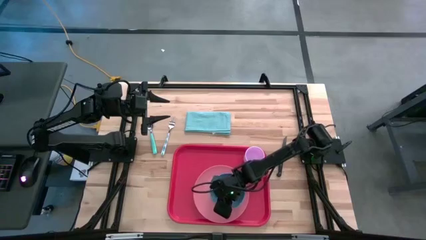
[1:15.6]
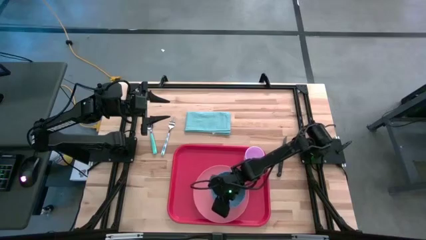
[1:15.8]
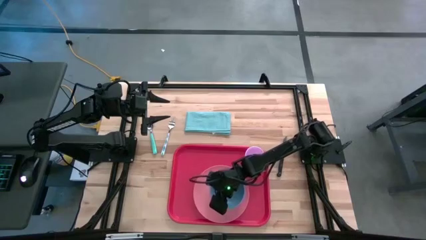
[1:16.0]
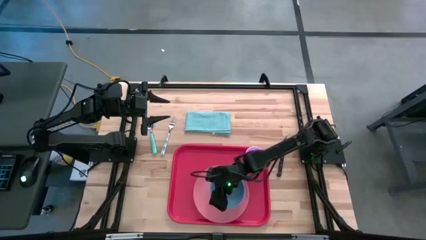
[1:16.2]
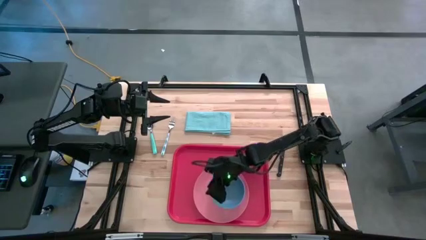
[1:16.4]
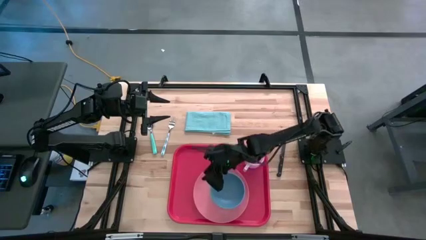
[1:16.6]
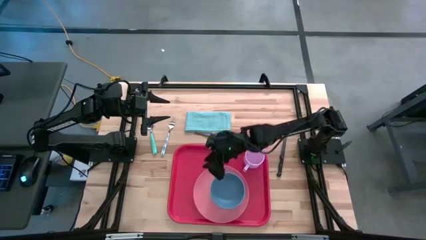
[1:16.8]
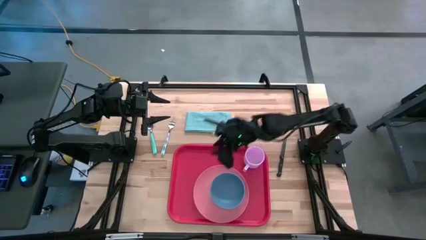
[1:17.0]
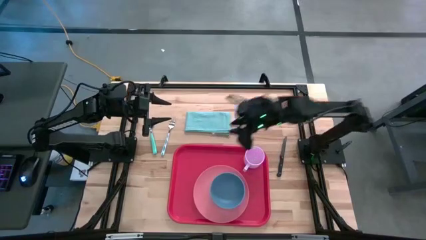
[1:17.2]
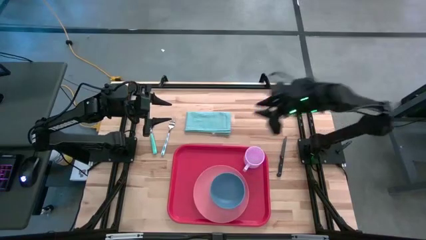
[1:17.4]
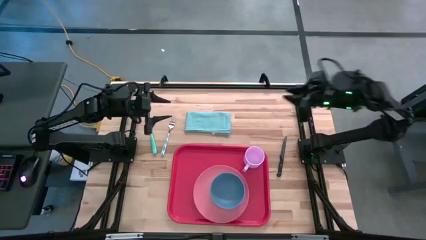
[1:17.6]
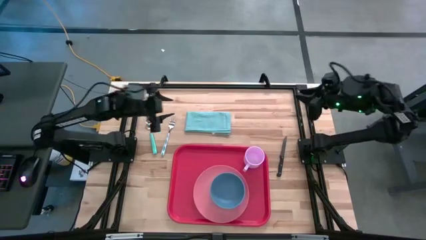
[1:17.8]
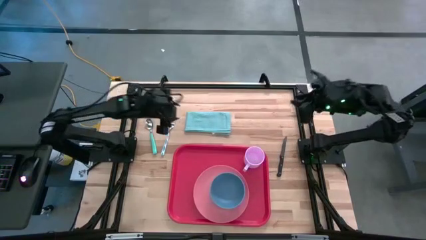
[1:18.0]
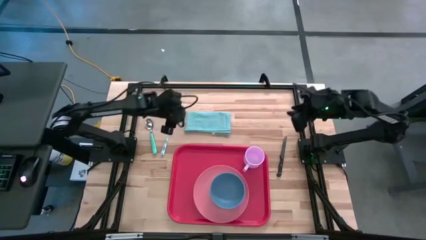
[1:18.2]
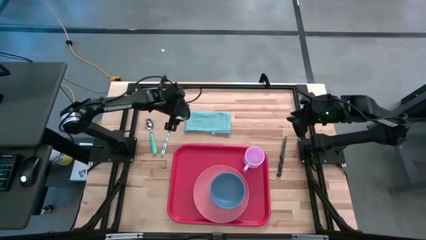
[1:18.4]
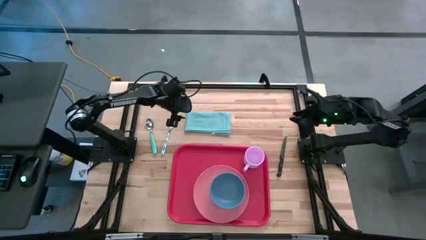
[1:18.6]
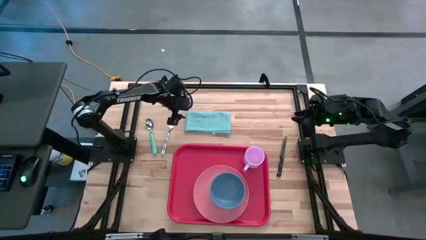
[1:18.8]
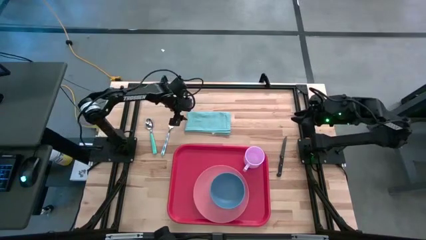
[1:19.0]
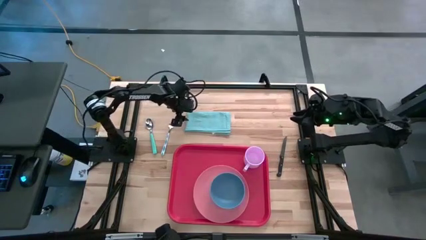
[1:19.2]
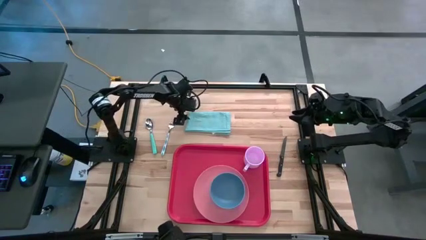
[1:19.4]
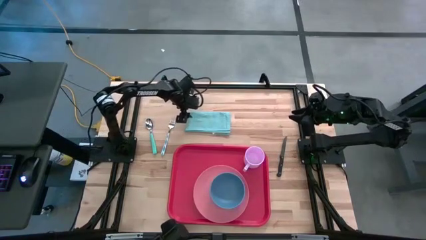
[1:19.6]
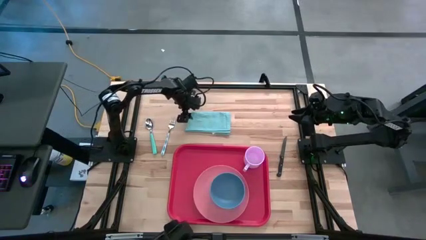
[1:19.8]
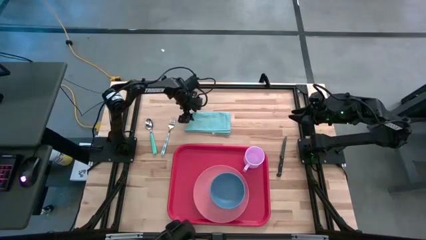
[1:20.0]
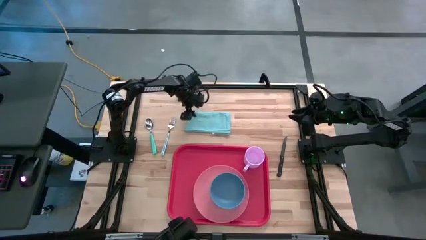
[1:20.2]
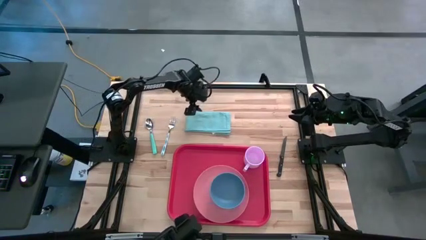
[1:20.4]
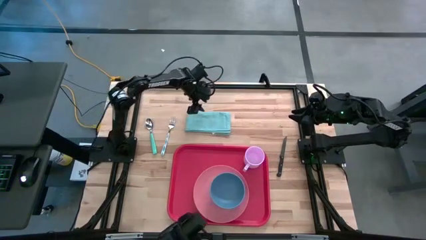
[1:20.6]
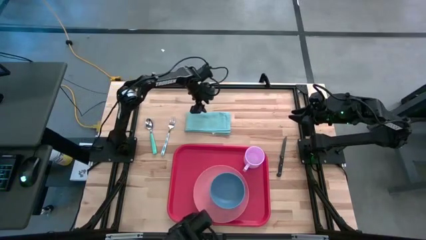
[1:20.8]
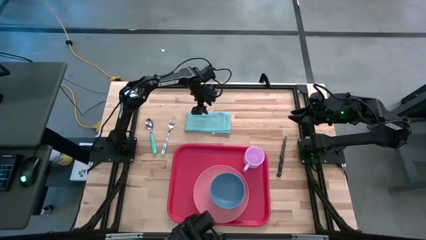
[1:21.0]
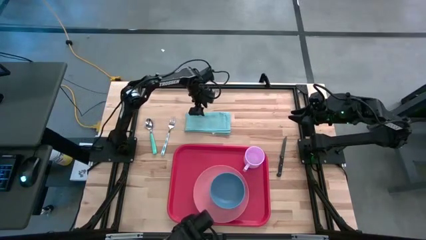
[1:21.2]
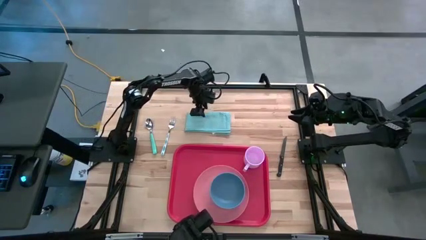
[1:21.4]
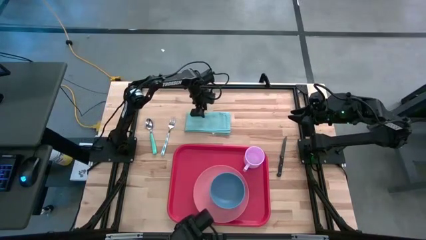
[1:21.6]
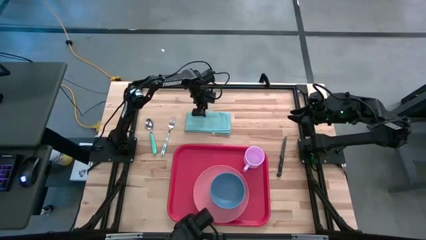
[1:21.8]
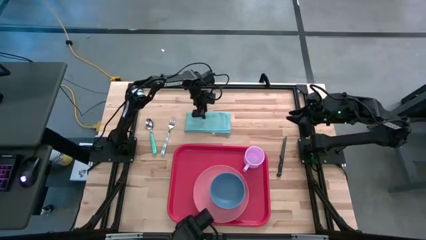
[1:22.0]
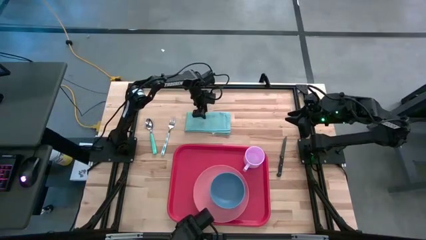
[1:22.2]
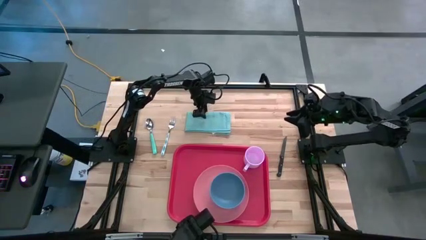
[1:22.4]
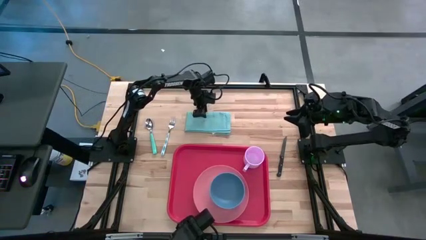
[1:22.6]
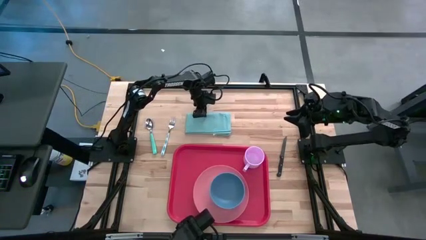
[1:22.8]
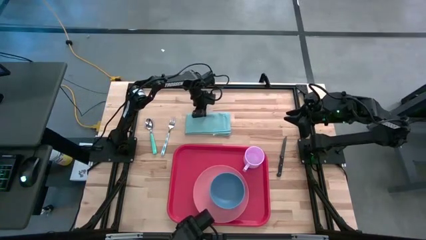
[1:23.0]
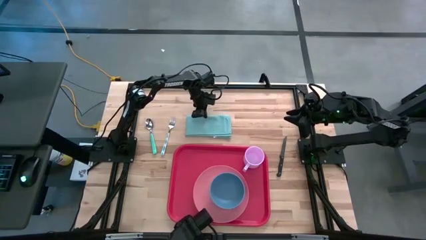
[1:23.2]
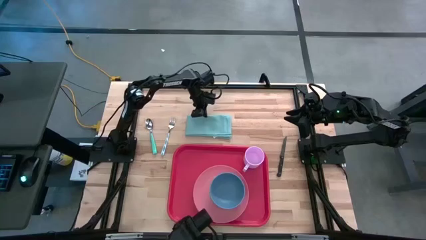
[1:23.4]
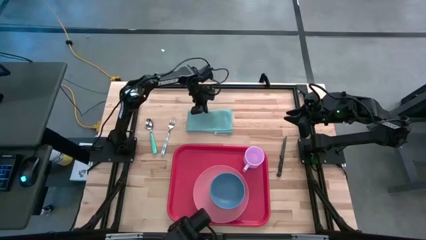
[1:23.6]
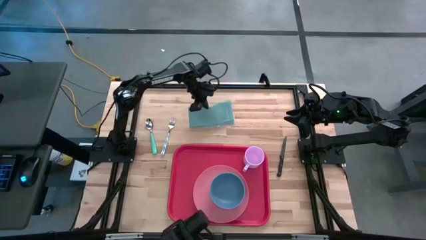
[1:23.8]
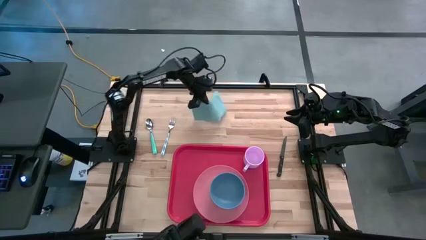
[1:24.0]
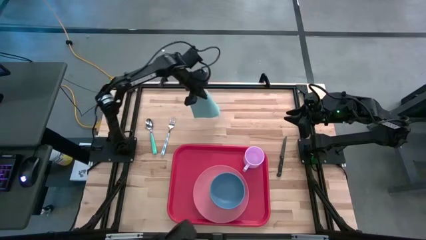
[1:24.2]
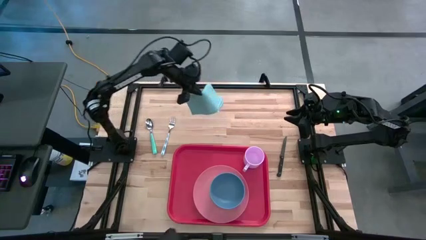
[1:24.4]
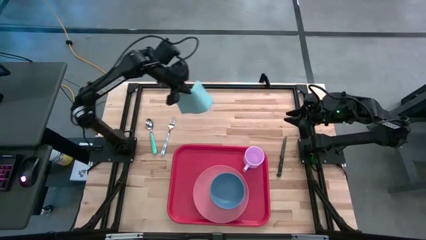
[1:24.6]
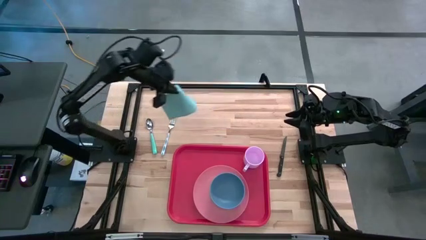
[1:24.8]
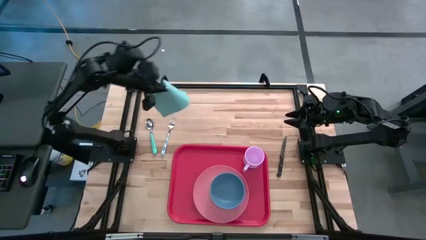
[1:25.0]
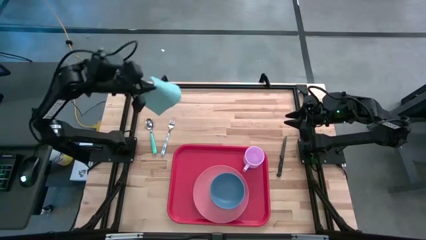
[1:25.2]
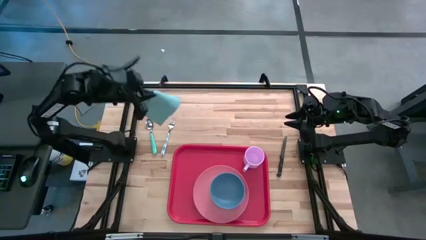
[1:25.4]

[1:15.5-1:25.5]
Task: Set up tray
Put the blue napkin on the tray to the left of the pink plate

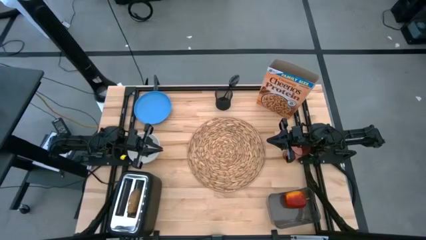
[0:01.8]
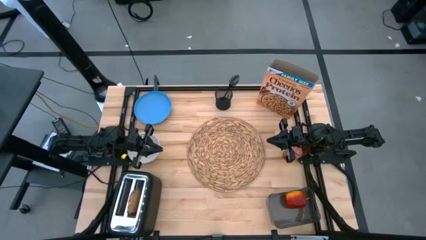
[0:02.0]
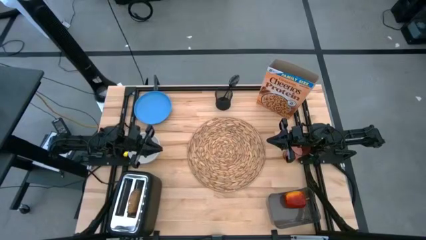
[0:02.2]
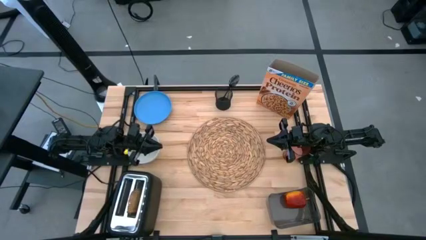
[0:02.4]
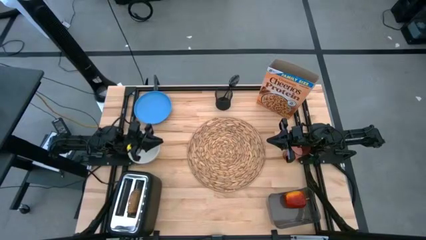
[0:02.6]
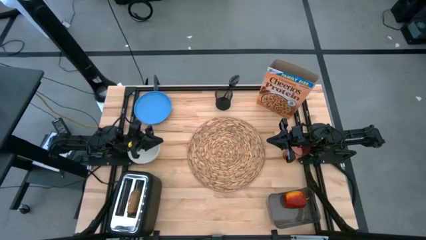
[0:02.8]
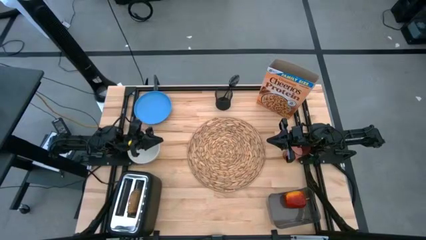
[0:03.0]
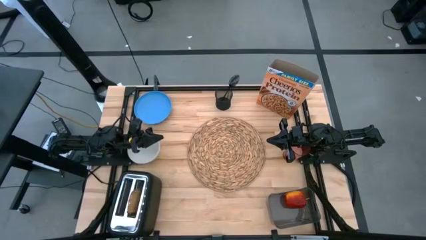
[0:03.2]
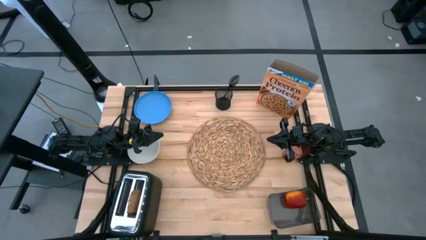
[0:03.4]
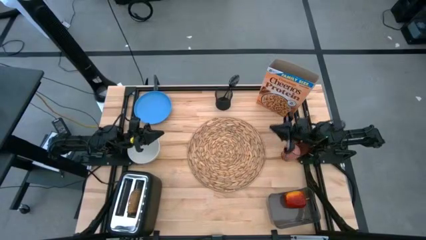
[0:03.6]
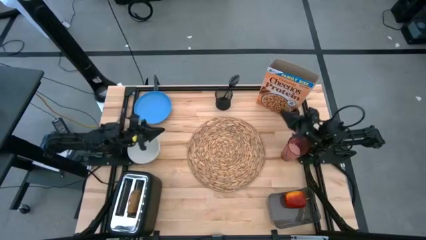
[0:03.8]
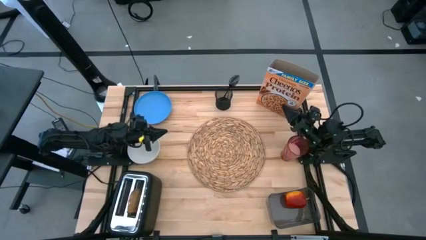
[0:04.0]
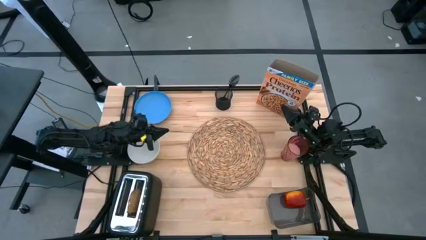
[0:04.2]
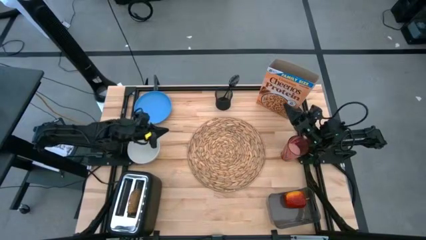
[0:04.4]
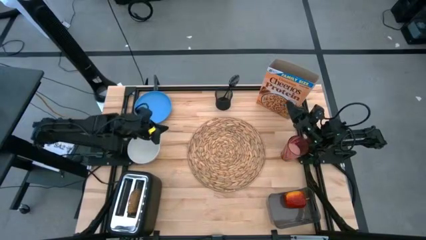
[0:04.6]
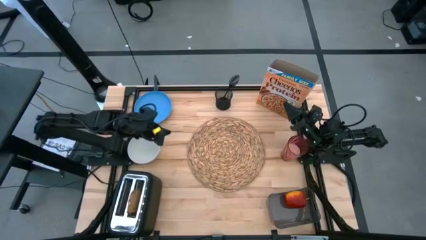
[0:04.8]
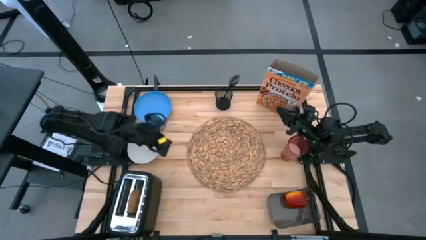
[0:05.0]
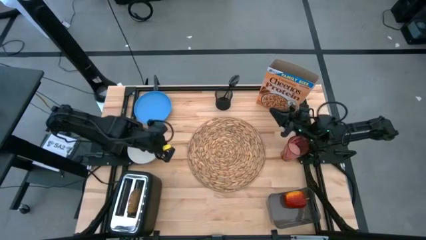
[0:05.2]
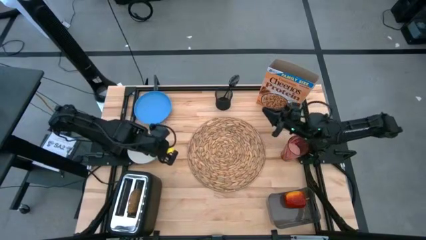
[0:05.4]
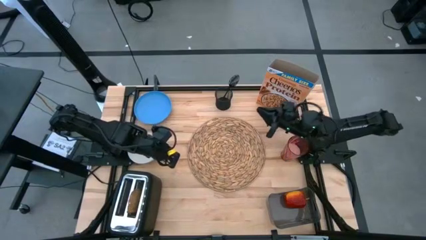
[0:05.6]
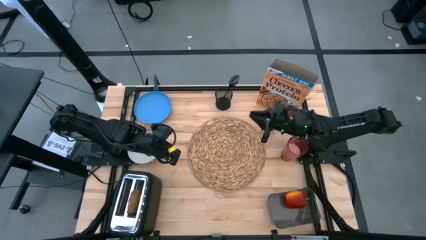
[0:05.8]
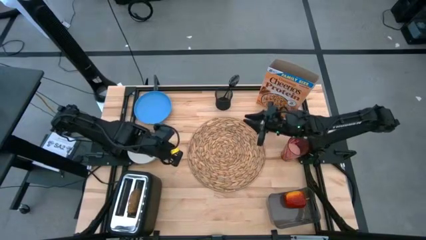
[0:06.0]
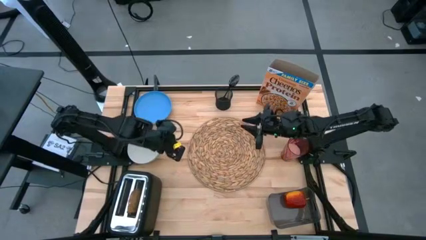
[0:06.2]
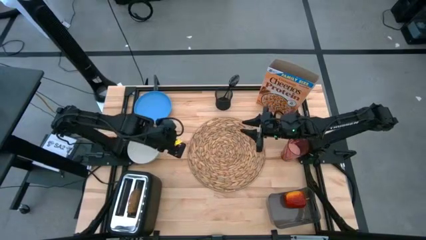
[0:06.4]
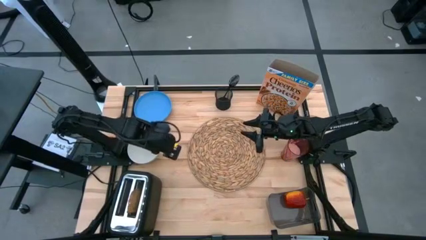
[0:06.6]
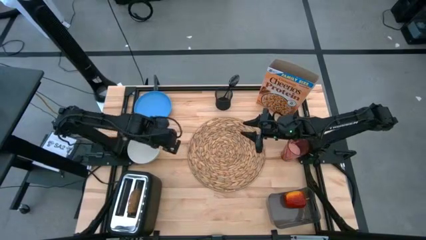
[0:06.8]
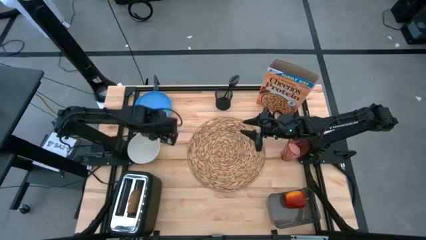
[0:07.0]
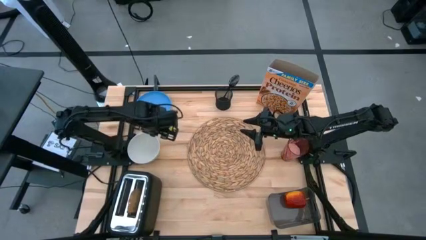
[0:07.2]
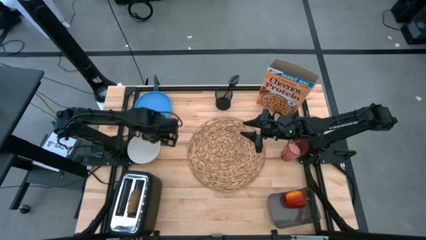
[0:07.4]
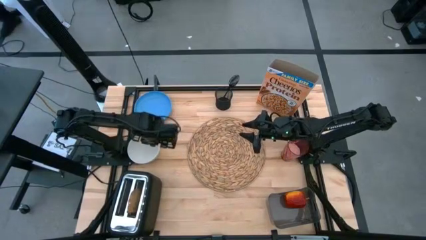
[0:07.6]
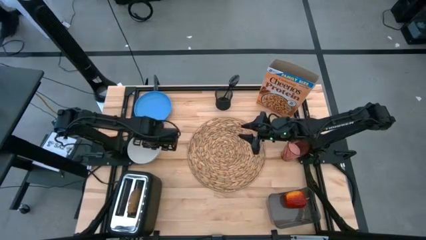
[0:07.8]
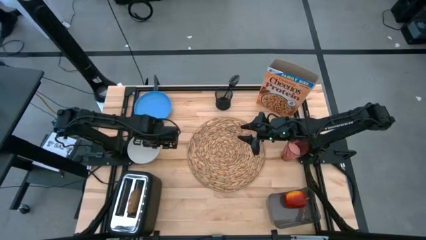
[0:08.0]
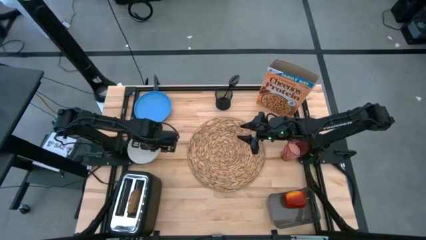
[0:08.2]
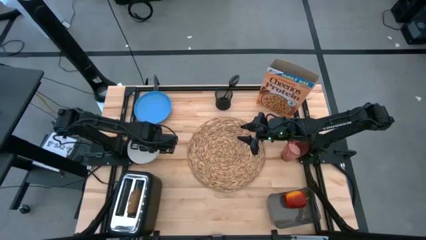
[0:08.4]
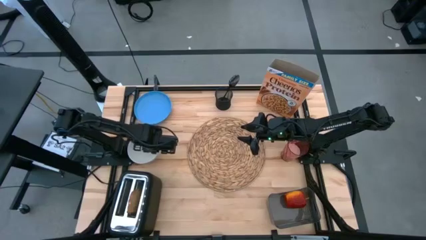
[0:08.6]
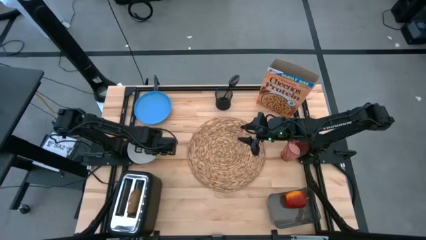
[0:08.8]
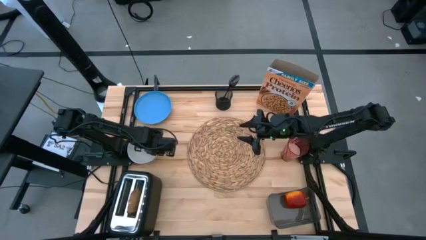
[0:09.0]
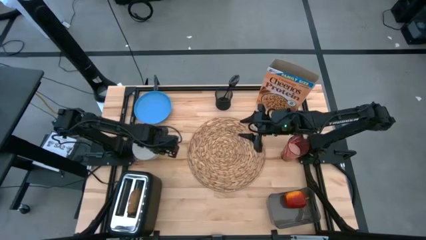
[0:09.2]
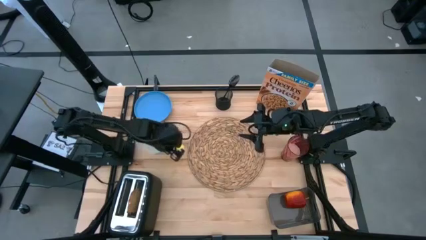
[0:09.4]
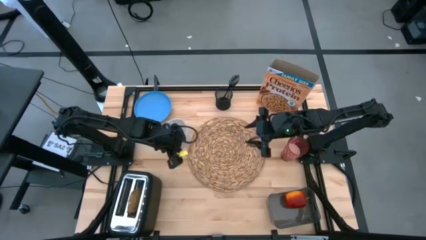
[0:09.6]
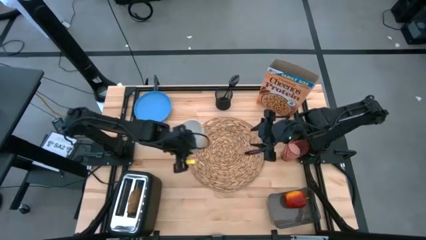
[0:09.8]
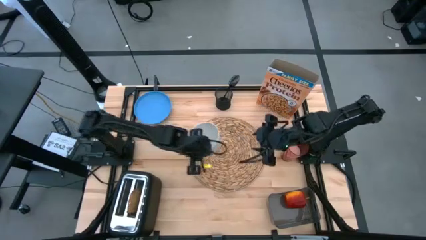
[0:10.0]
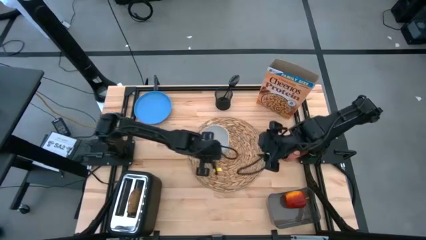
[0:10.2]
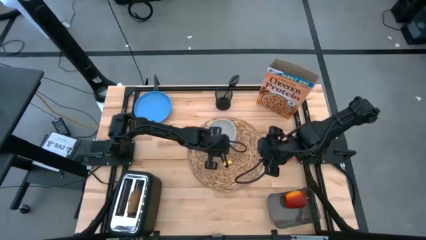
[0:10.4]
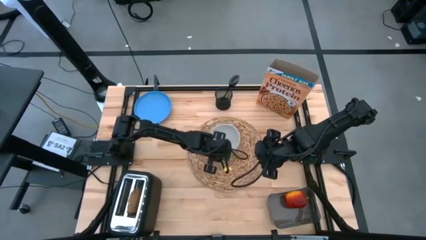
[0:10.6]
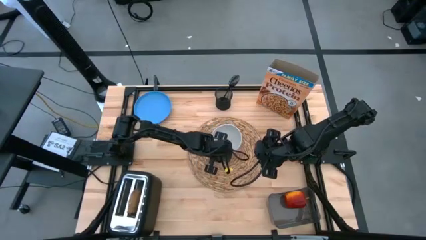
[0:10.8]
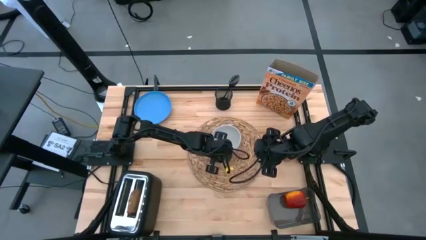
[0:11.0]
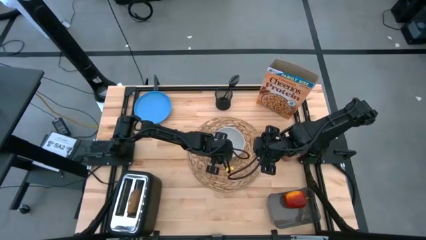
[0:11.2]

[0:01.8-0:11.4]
Task: Arrange a breakfast setting
Put the white bowl on the brown placemat
